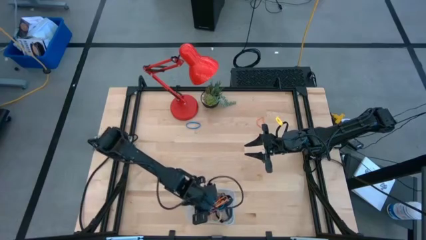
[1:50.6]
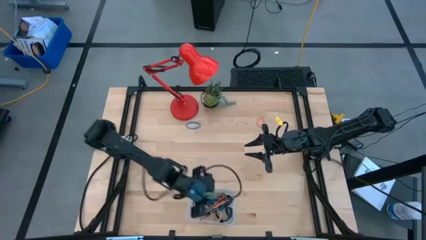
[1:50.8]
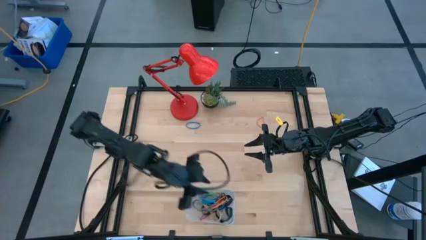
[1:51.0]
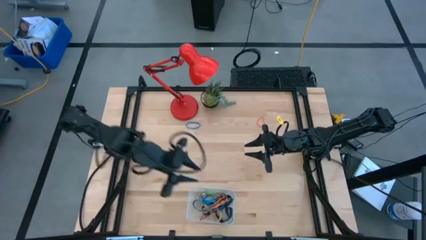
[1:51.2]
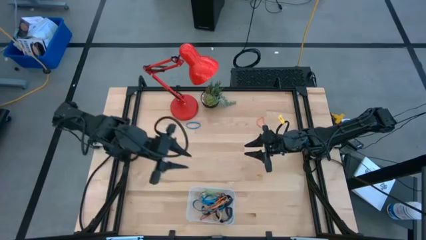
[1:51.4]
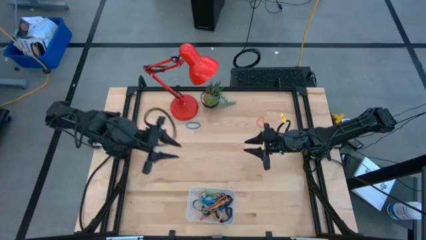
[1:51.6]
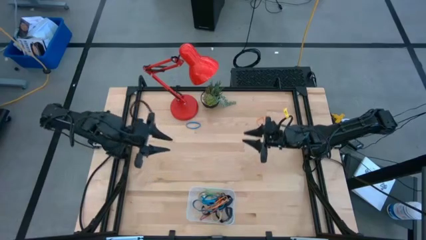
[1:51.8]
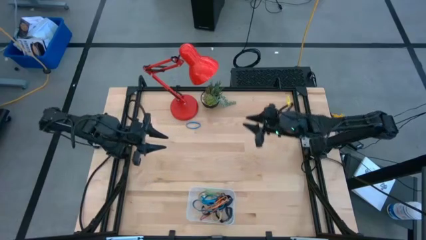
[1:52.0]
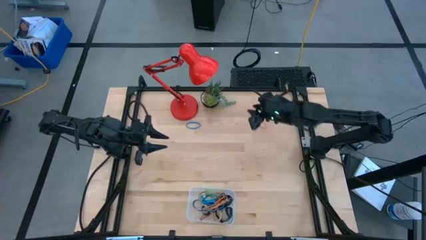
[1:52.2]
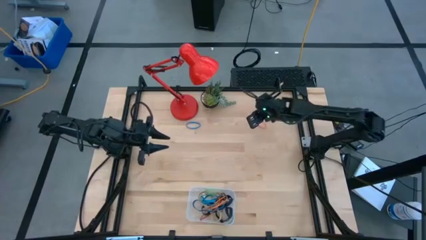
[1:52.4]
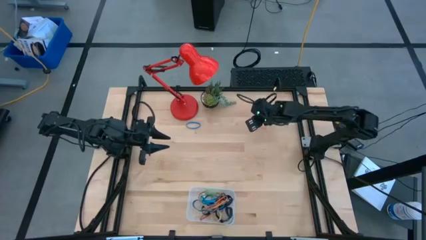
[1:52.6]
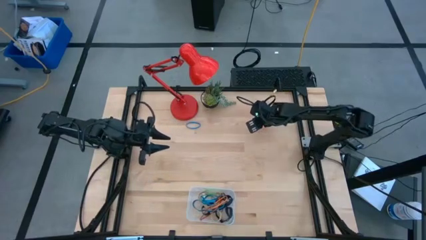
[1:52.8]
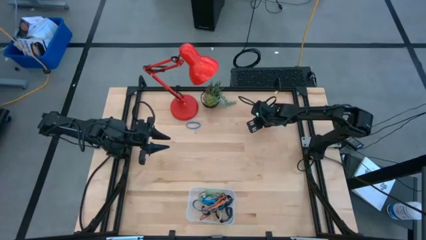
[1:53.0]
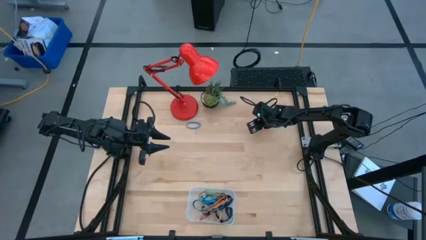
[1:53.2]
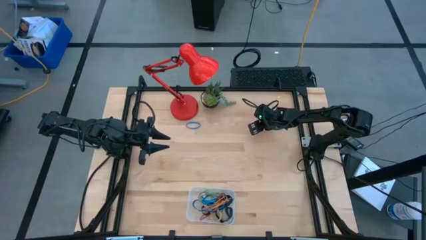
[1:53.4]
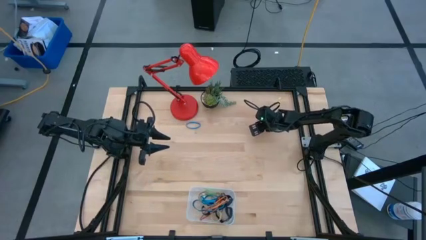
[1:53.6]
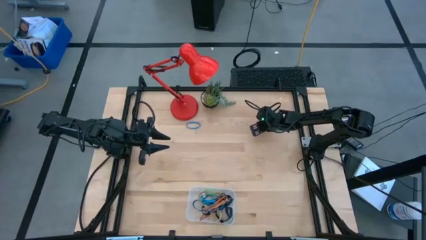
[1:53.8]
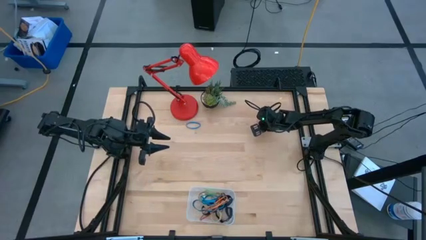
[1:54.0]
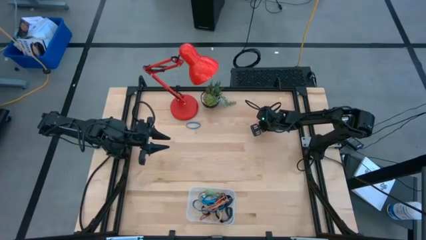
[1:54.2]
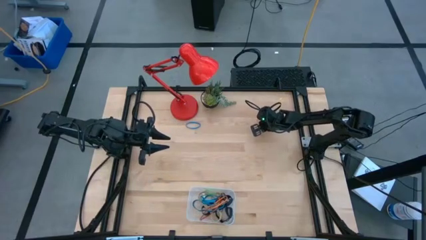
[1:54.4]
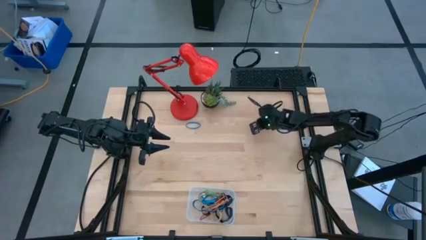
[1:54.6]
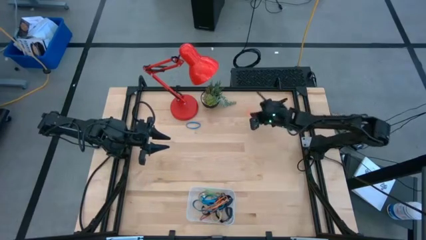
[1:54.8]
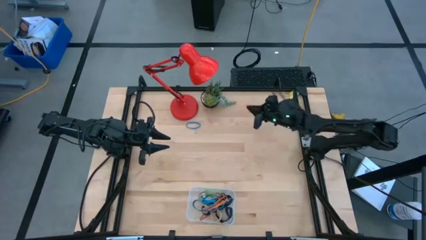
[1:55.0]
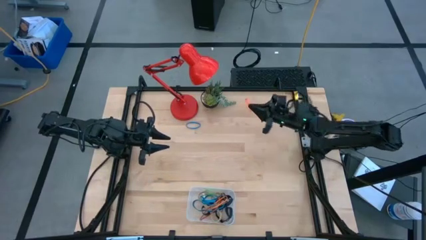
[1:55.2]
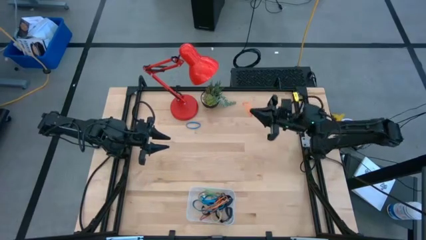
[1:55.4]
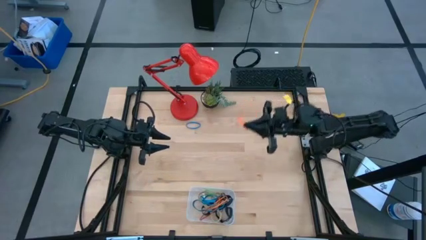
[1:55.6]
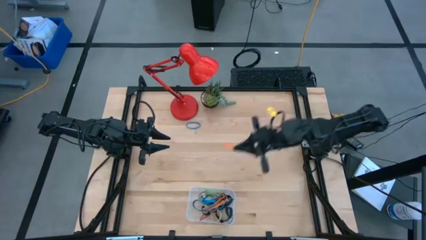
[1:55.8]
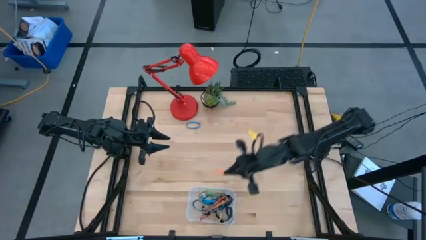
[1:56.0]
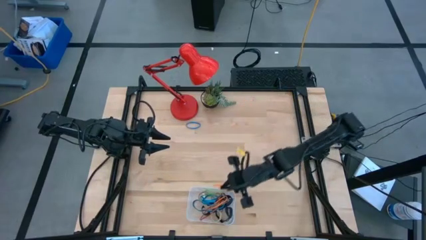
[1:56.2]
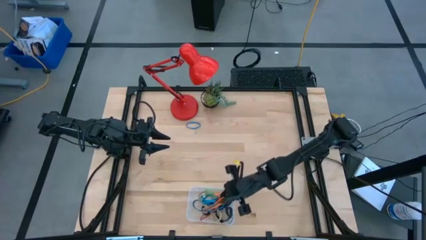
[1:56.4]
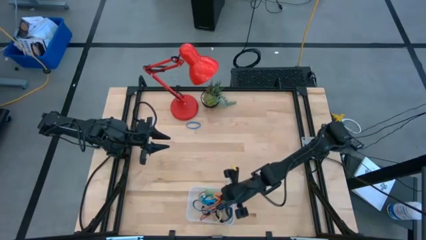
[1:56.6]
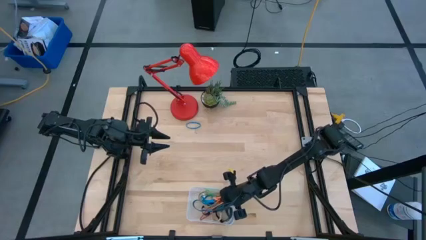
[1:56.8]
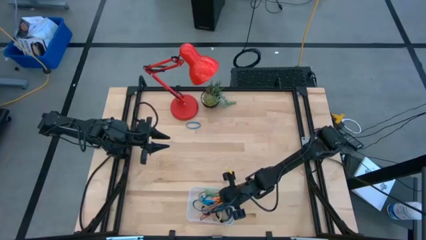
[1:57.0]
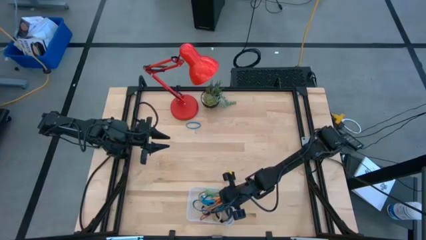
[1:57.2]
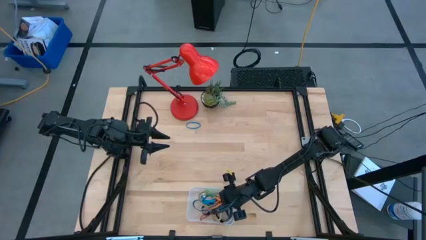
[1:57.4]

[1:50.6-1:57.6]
Task: Pick and place rubber bands into bin
Put the orange rubber band into the transparent bin

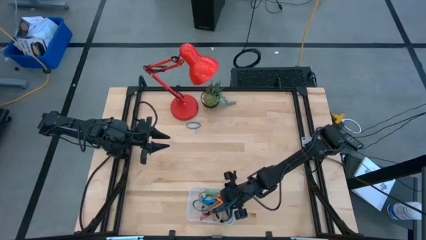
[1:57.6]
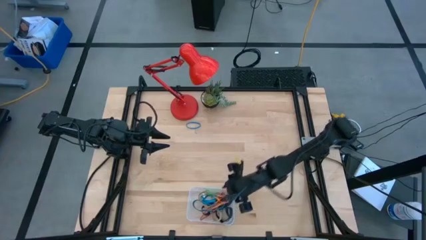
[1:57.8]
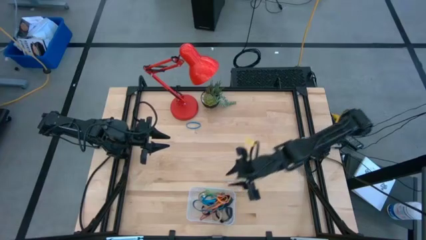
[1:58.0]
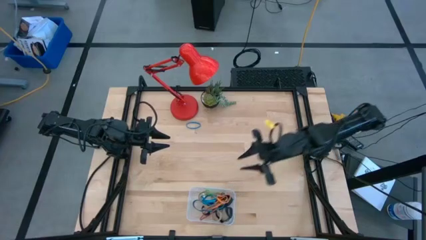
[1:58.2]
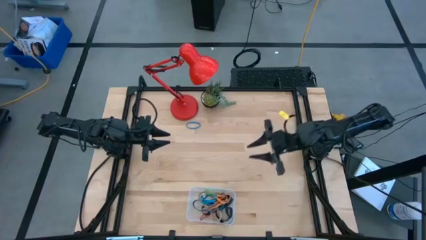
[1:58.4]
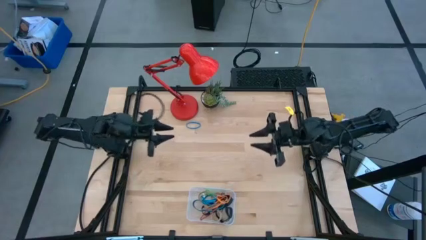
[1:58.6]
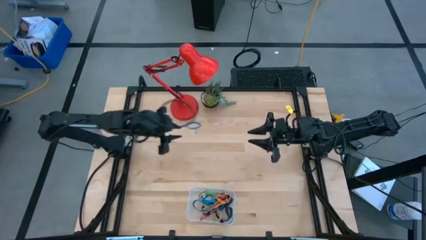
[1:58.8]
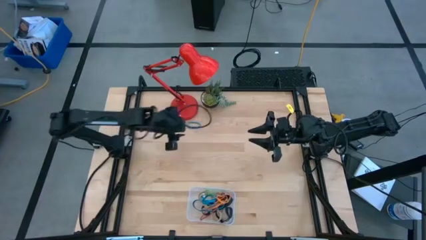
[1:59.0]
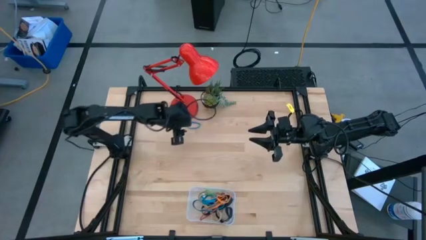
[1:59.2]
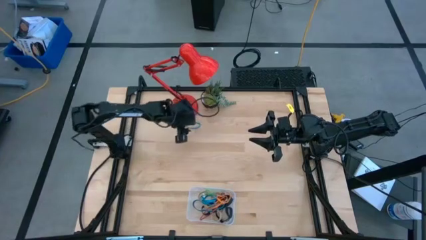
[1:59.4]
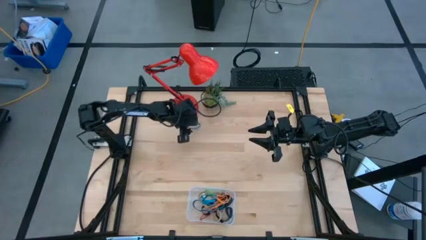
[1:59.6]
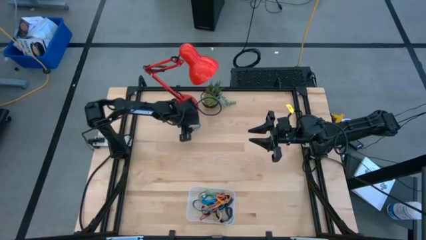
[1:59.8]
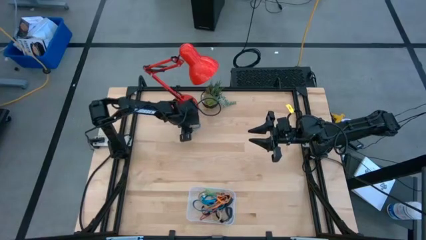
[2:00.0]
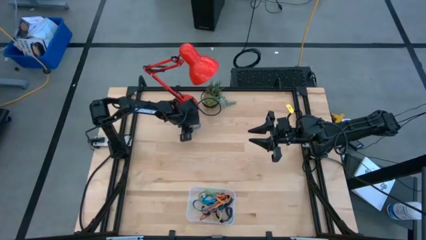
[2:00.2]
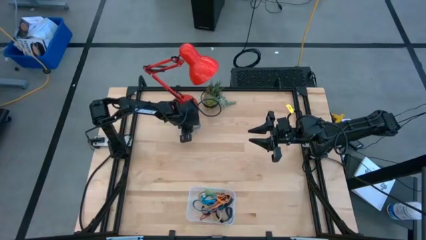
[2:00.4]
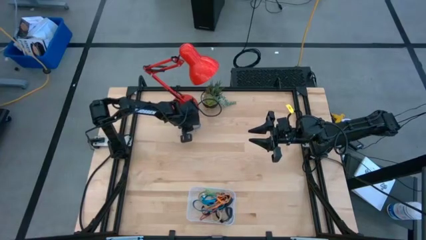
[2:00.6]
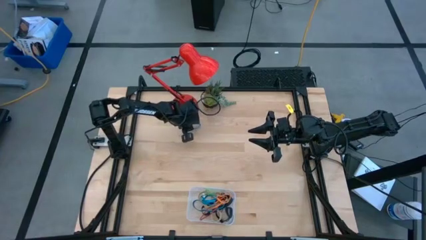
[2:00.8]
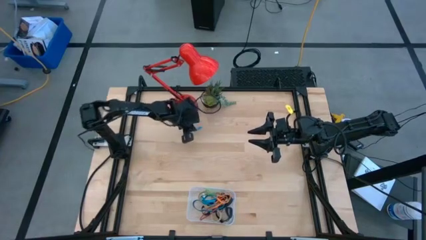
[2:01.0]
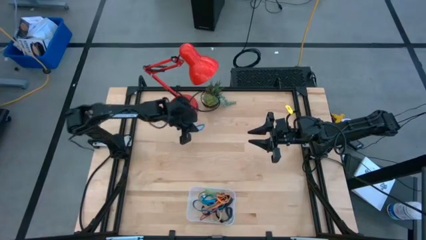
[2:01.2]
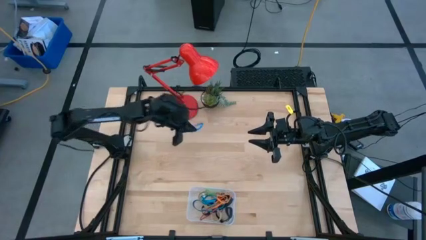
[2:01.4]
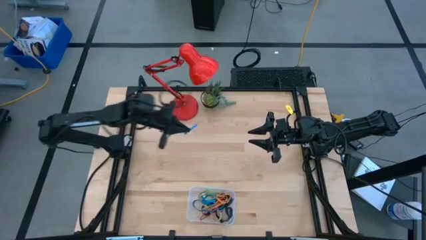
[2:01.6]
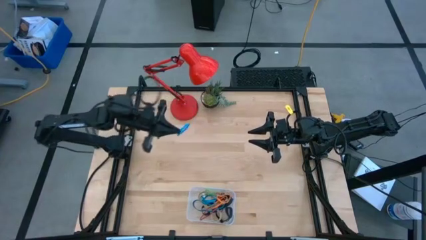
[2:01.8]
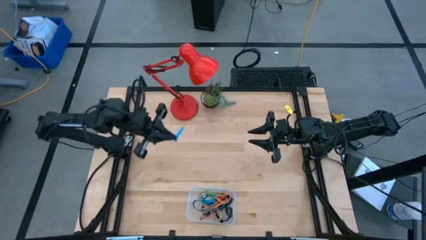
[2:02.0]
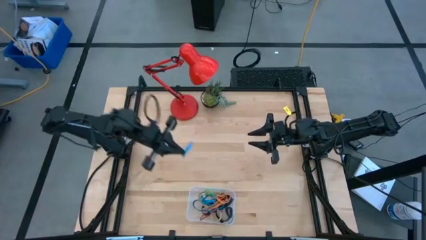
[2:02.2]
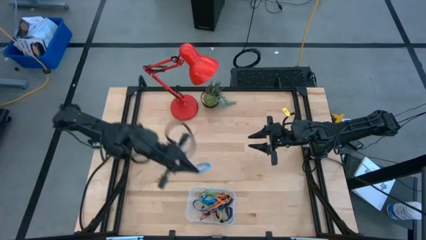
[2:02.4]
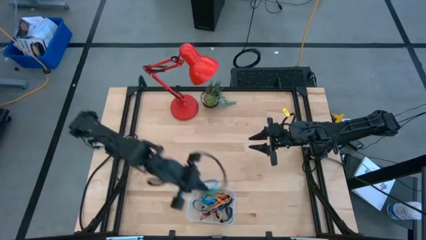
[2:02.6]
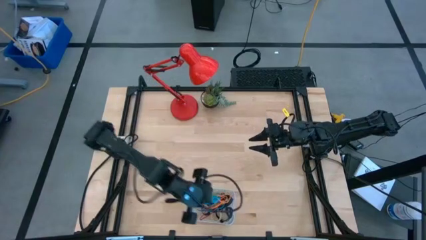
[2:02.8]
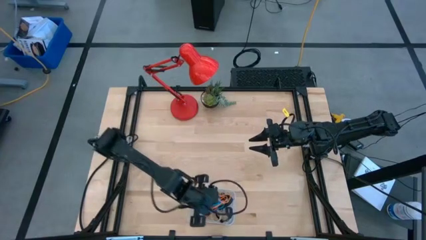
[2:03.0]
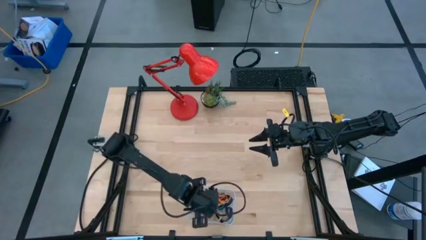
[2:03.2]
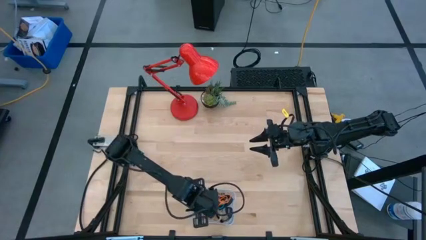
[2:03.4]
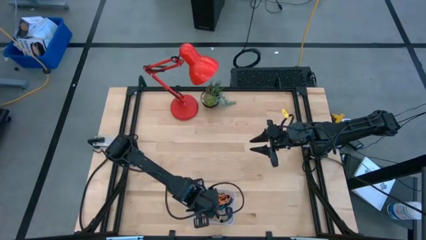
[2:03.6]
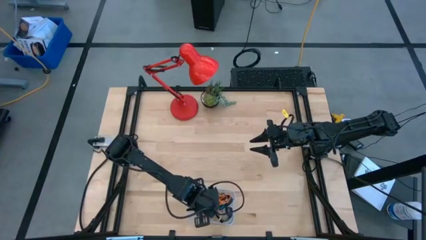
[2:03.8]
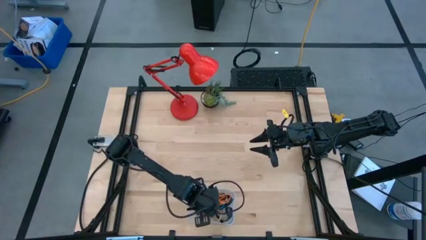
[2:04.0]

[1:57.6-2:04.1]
Put the blue rubber band into the transparent bin

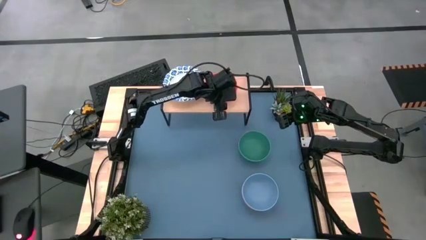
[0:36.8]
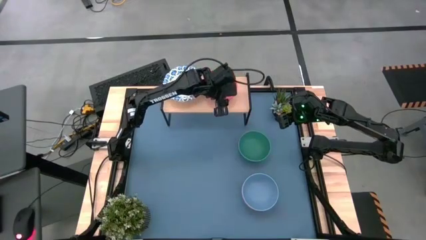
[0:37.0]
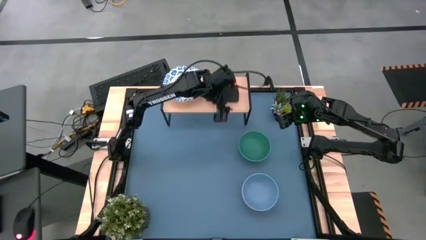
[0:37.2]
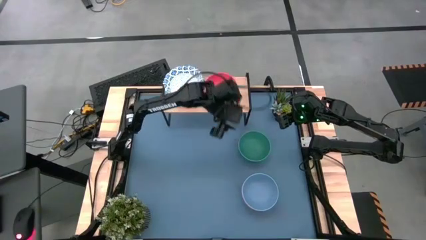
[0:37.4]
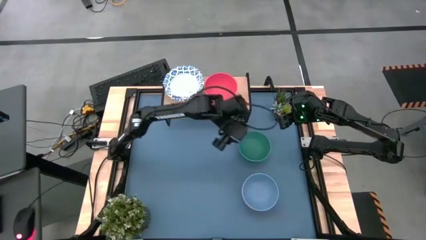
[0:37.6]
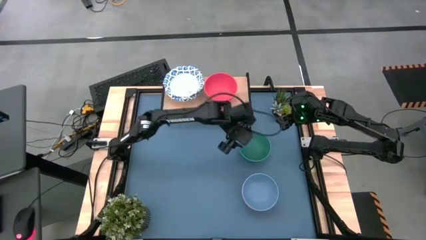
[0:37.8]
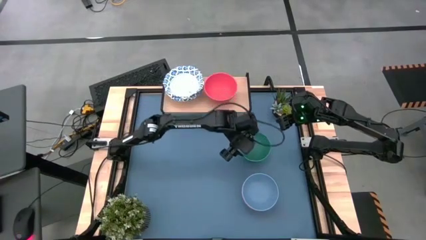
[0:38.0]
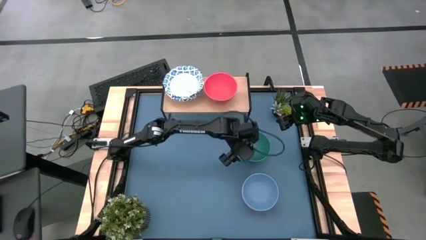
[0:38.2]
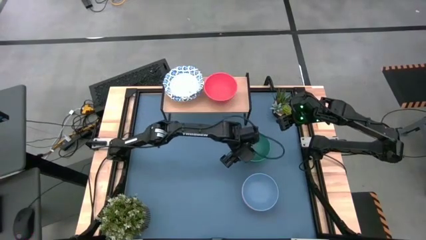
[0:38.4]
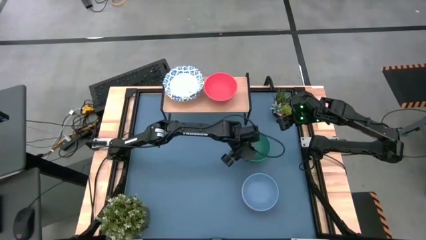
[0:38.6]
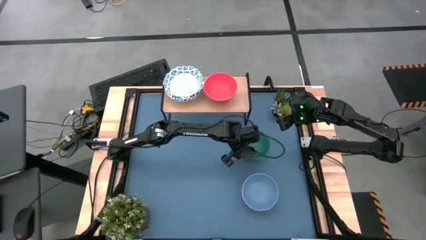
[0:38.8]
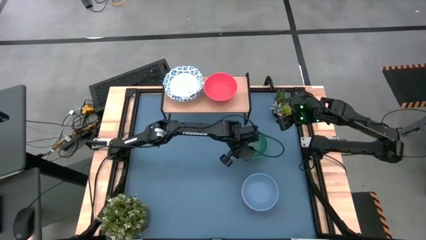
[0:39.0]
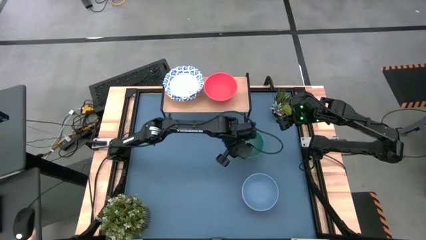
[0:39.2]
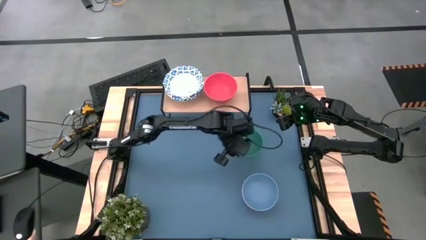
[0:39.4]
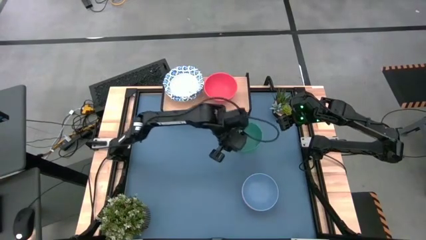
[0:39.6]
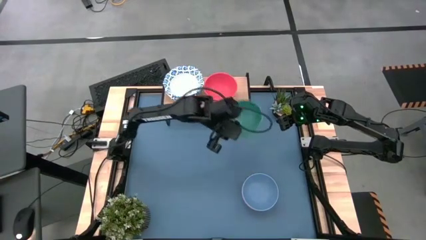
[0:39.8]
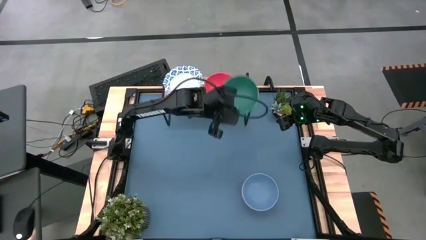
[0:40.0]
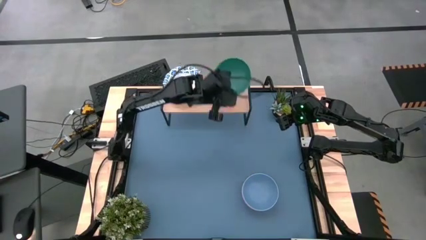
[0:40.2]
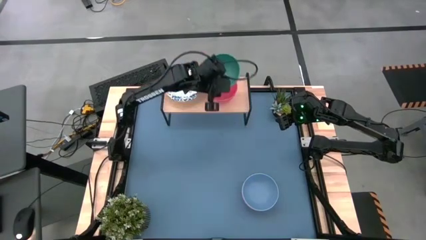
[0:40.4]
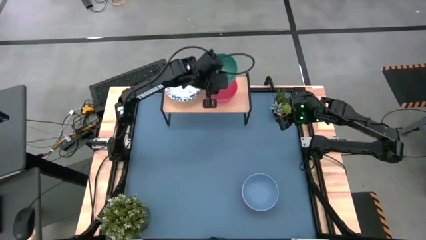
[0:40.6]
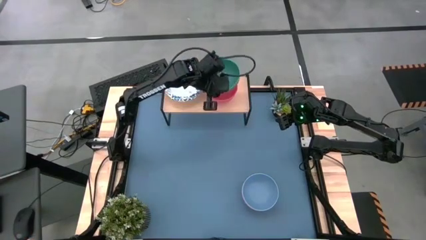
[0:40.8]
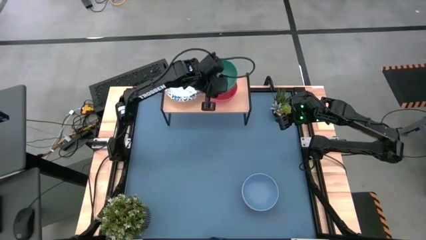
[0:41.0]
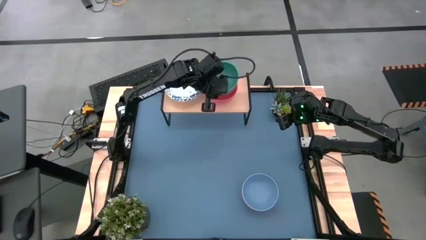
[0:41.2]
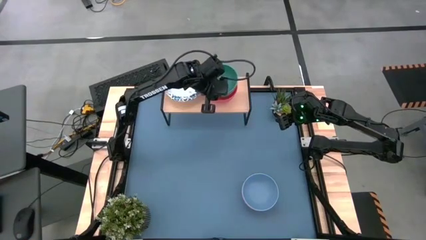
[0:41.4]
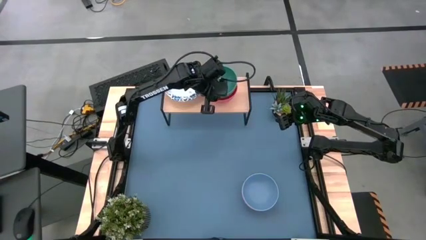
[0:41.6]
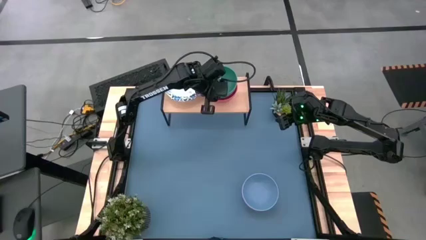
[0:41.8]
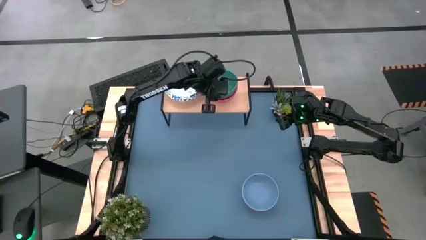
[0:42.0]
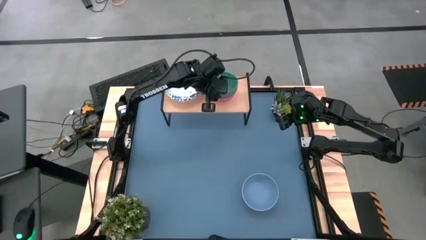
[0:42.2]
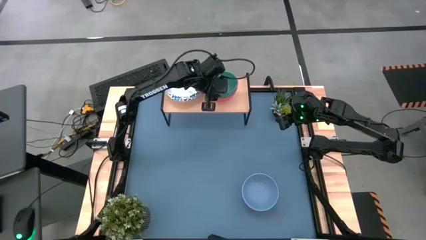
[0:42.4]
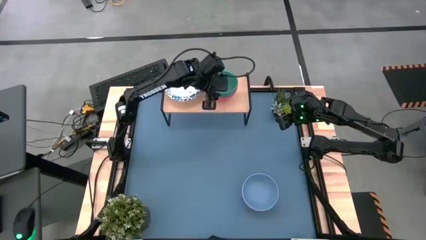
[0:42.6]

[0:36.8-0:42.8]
Task: Place and stack bowls onto a shelf
Stack the green bowl on the orange bowl on the shelf
